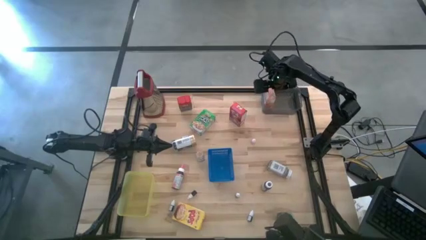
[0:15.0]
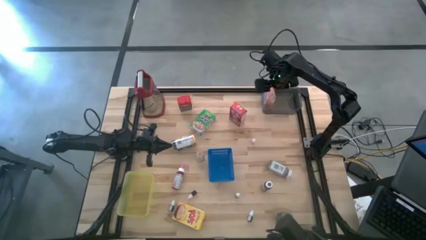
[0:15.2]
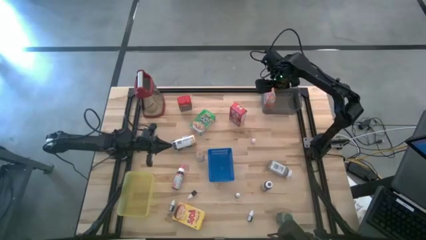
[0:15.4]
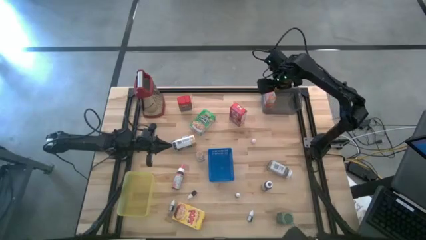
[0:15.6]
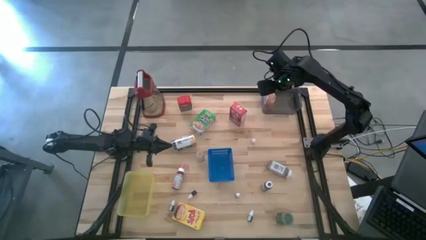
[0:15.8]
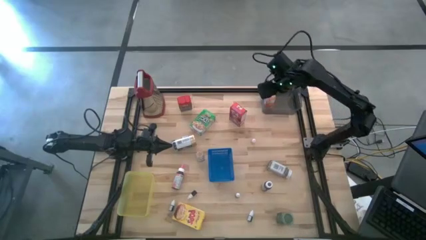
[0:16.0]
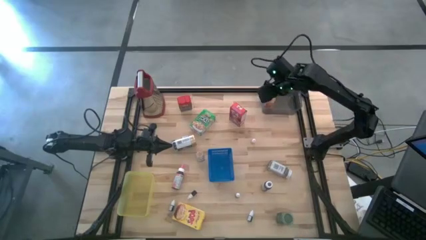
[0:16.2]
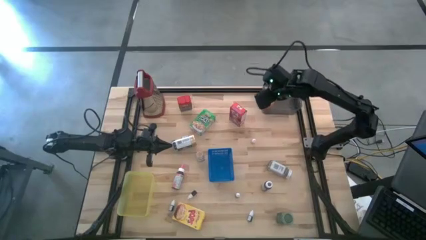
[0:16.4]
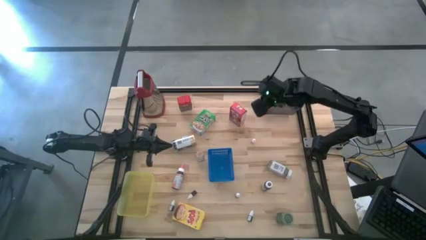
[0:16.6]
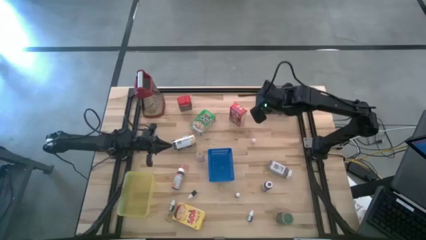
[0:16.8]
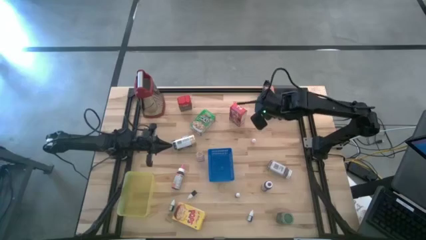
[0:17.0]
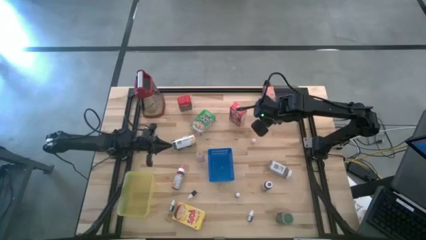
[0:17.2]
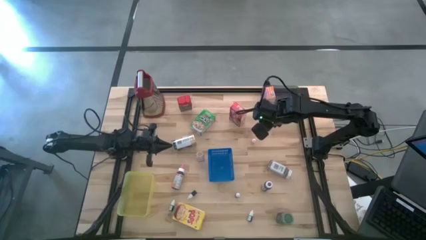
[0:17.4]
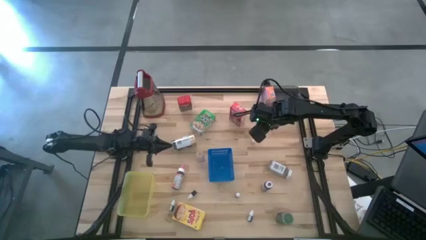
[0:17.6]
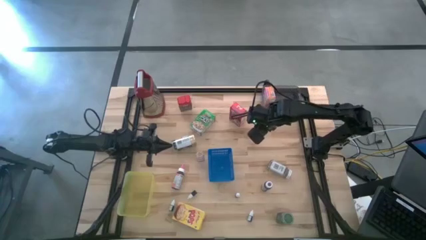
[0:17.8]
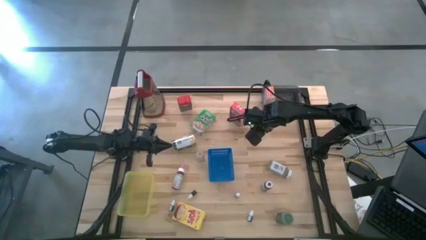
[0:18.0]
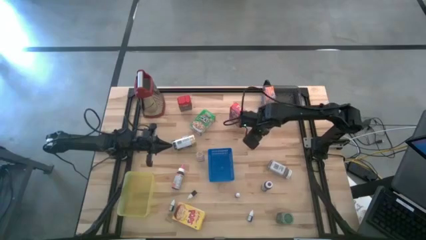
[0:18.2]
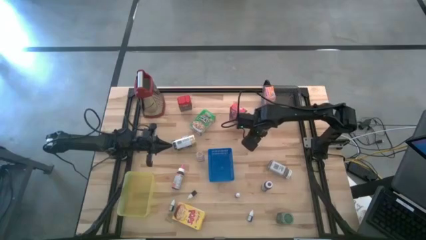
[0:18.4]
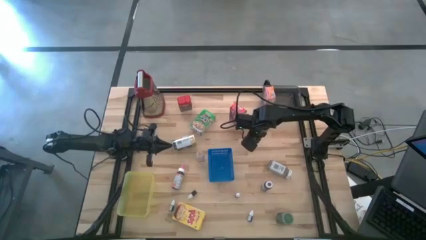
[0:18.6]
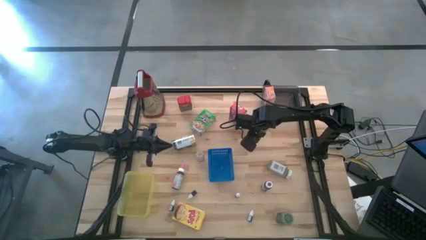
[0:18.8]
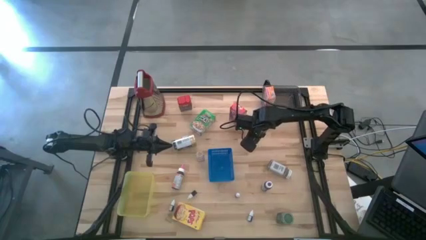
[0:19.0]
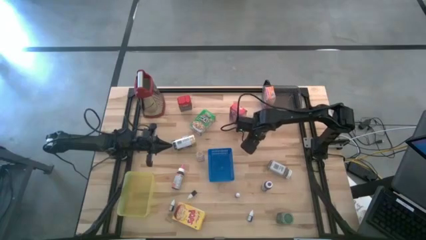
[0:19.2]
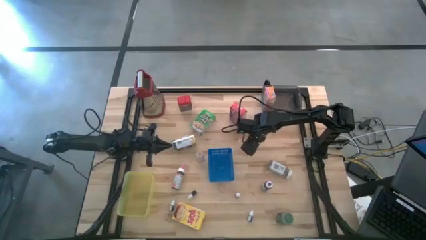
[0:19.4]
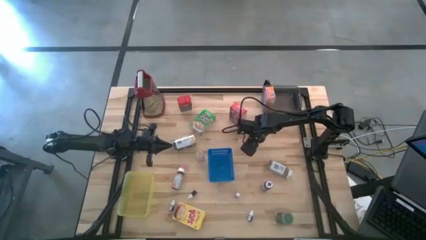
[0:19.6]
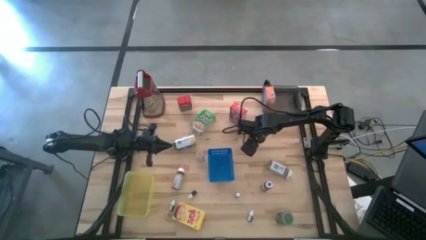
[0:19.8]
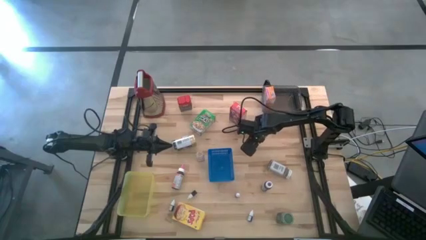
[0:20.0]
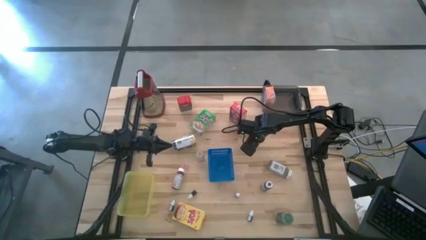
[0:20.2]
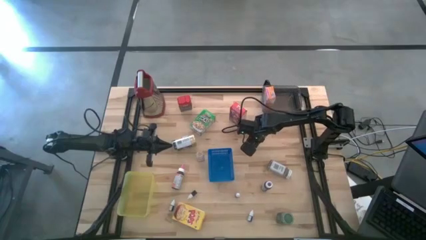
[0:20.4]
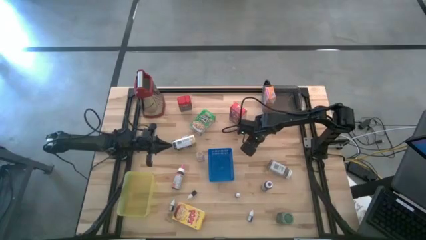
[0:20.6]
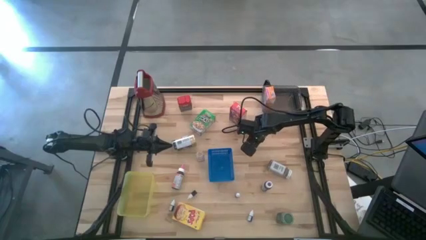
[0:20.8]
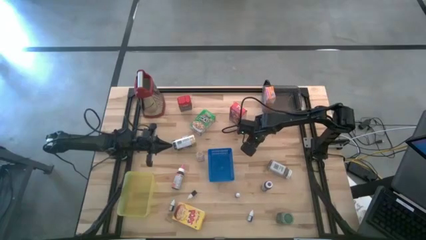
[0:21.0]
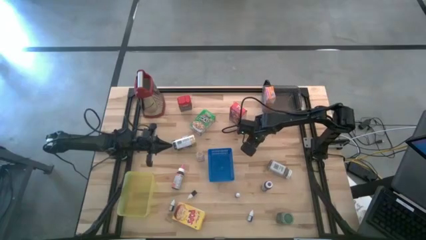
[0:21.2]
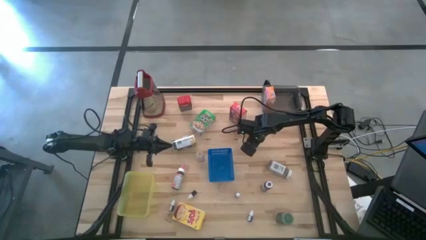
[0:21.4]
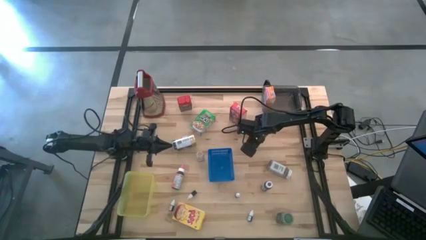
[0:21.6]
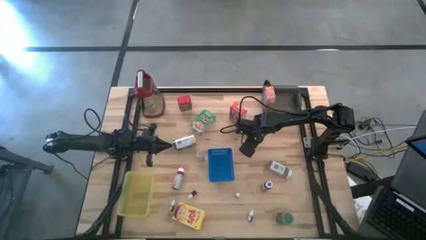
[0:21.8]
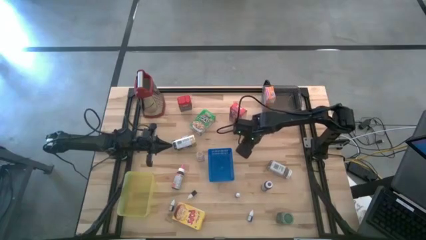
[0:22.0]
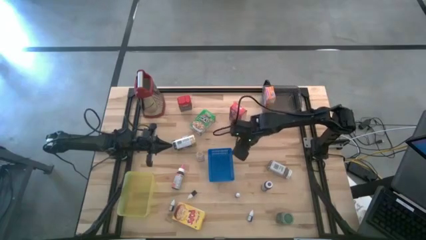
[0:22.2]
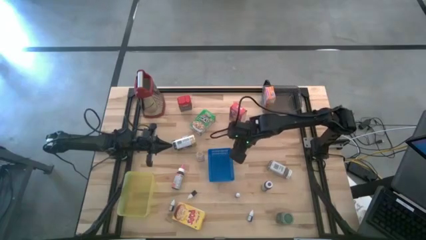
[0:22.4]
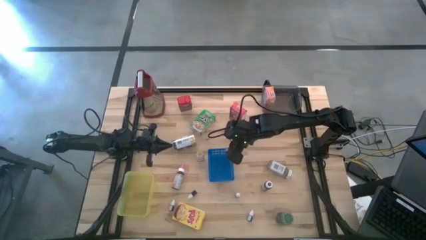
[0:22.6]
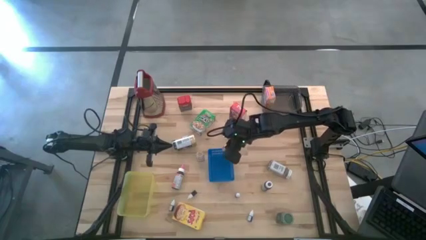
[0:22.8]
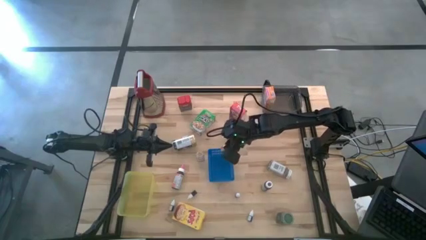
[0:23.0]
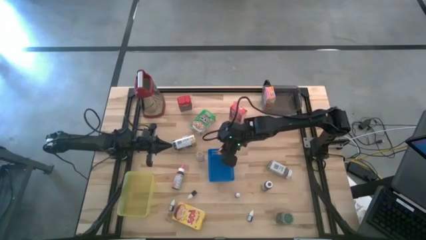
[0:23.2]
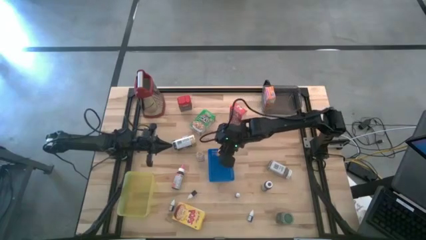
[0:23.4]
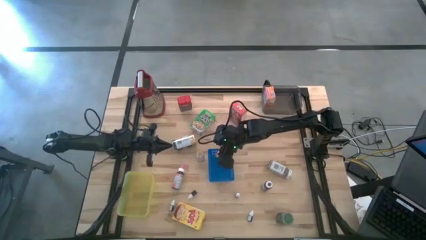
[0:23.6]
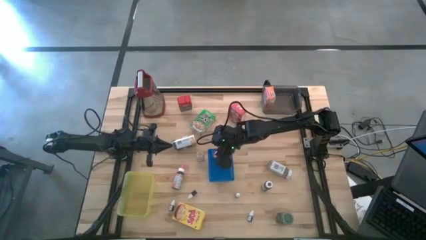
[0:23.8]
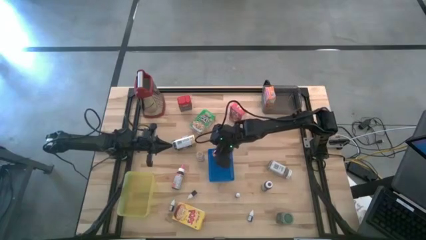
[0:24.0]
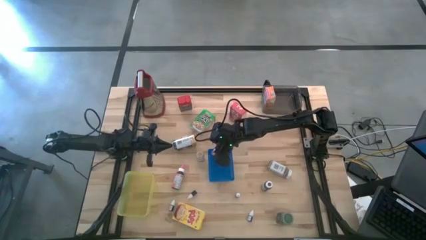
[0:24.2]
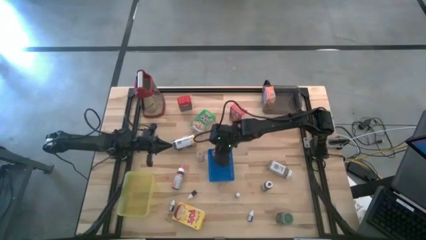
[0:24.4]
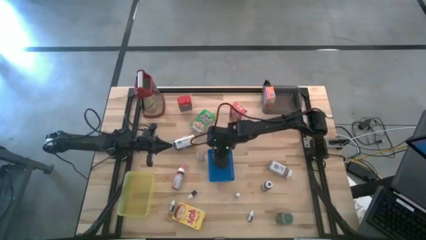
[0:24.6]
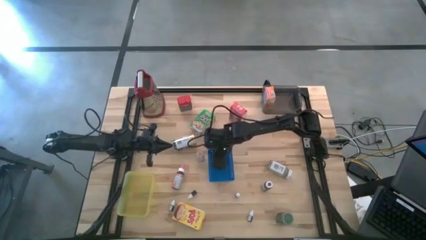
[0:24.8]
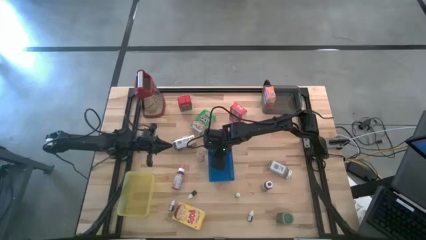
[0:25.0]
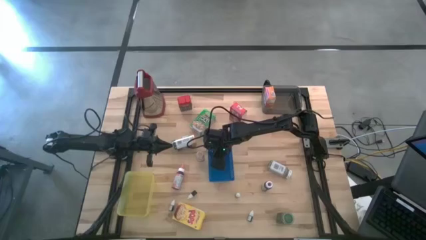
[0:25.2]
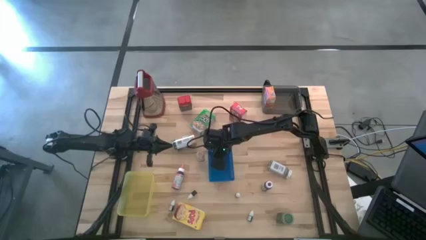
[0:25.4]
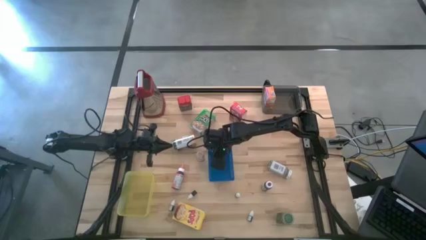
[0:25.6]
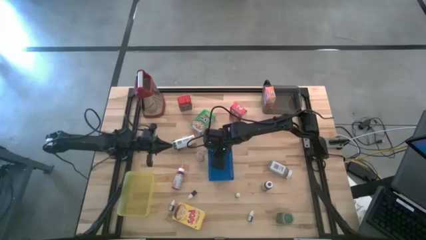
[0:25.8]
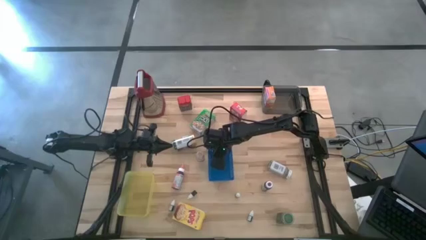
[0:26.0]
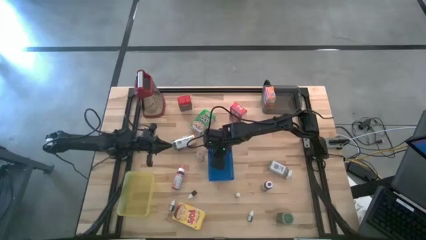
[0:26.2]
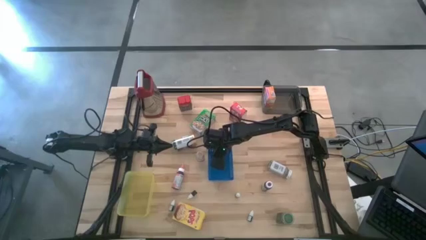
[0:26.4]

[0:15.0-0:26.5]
Task: Pick & Place Kitchen Items
Put the small yellow food coloring bottle into the blue bin
